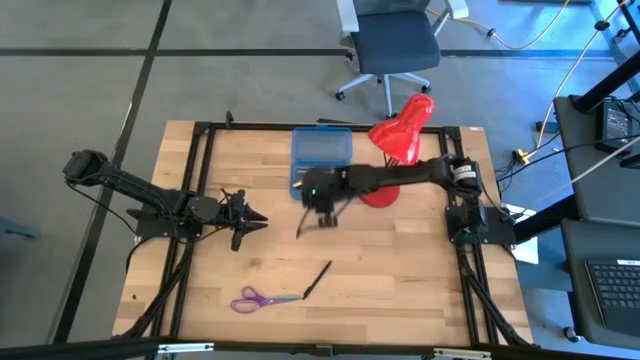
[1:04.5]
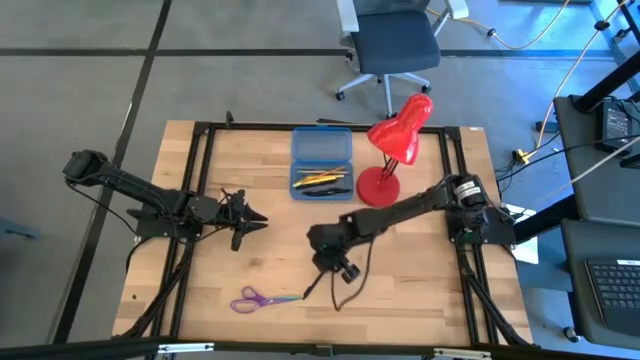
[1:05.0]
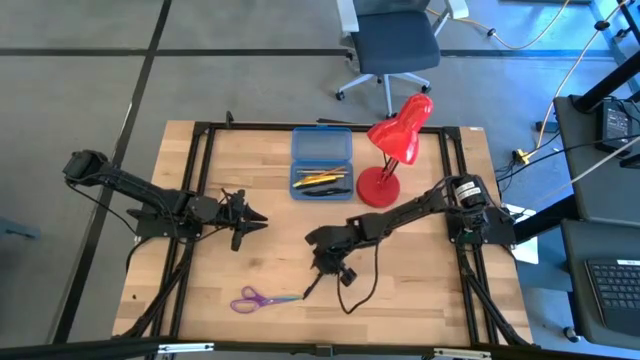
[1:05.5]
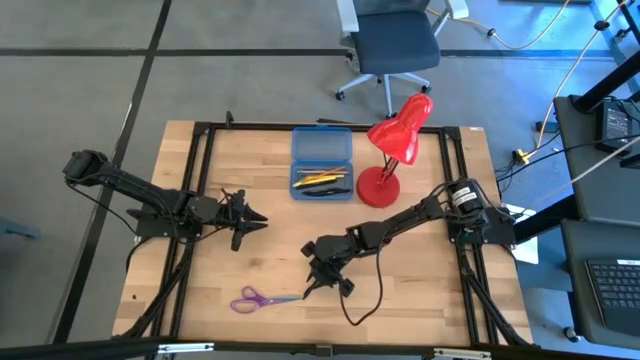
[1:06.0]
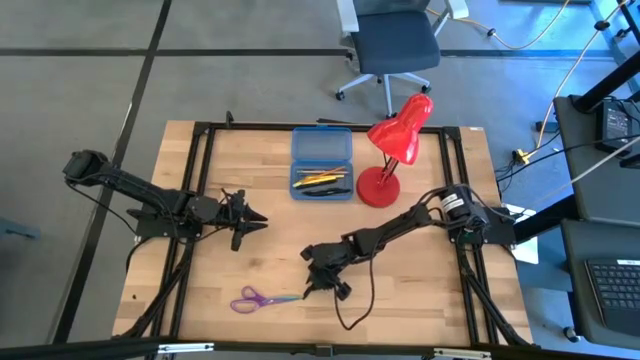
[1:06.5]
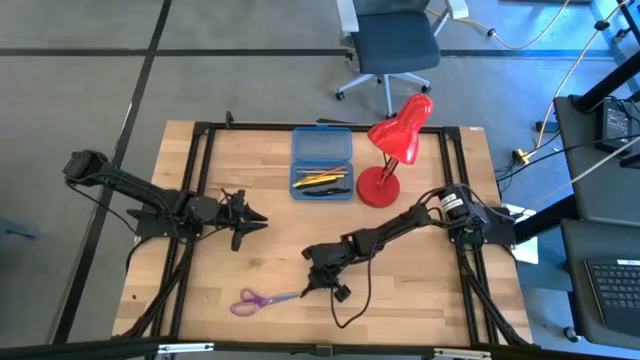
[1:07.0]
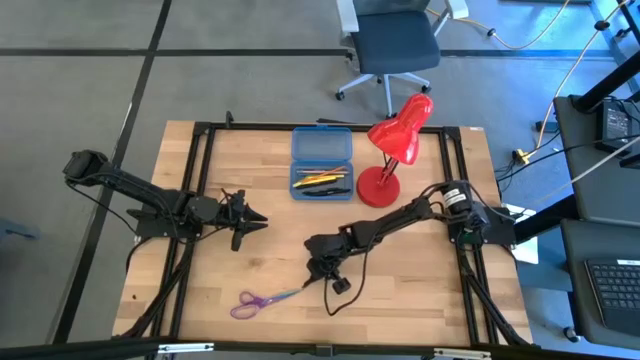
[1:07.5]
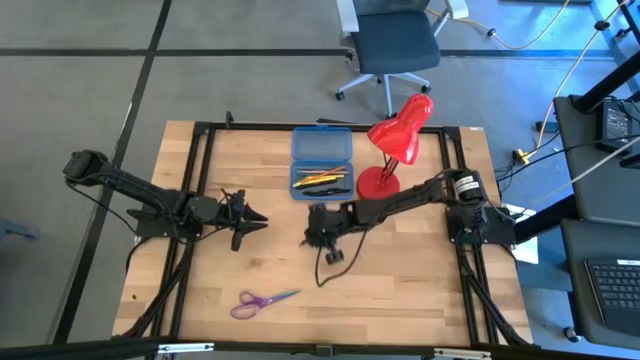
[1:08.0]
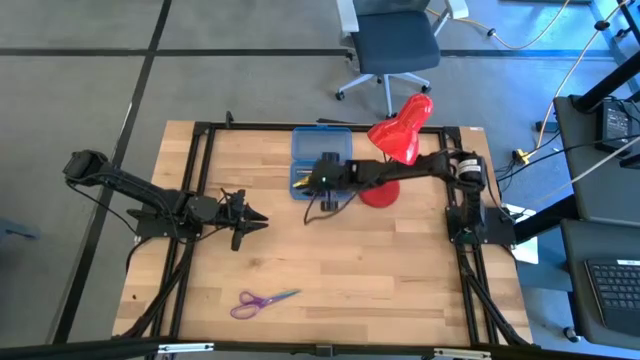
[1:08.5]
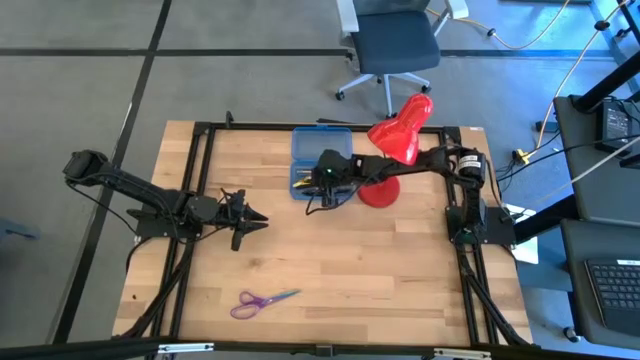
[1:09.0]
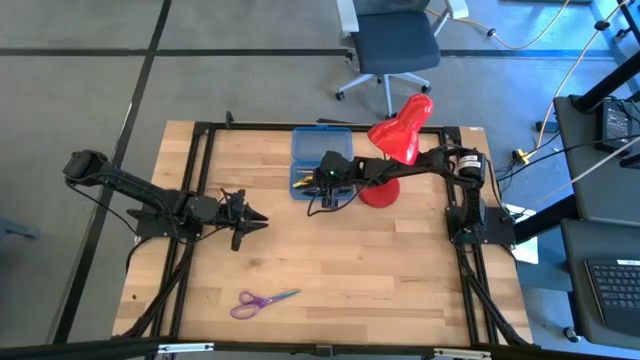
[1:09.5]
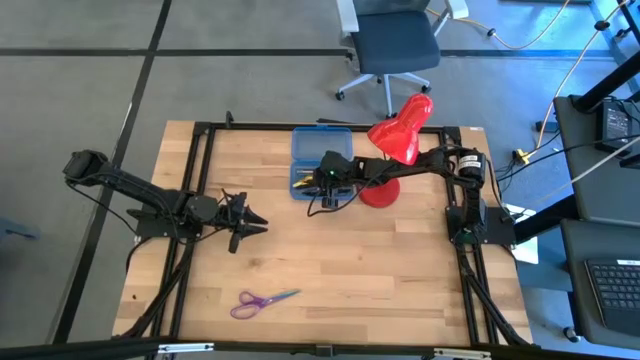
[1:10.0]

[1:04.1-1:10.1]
Task: Pick & place school supplies into a supply box
Put the black pen into the blue supply box

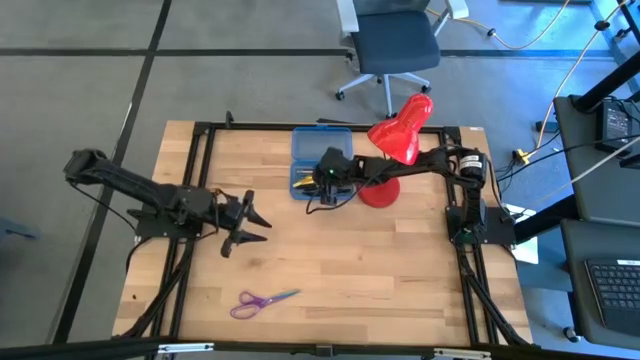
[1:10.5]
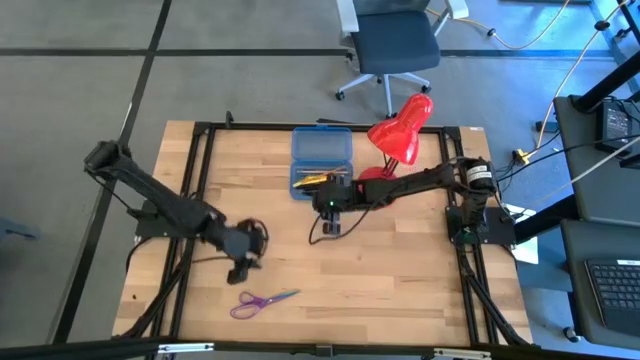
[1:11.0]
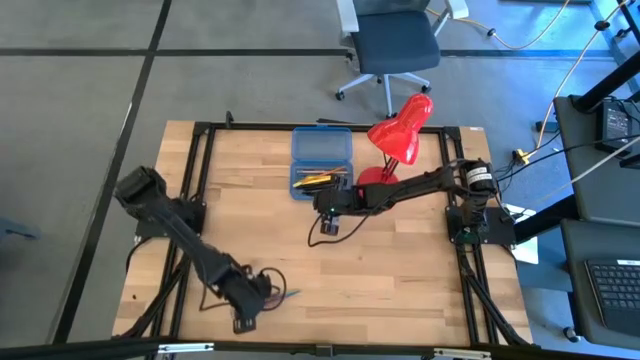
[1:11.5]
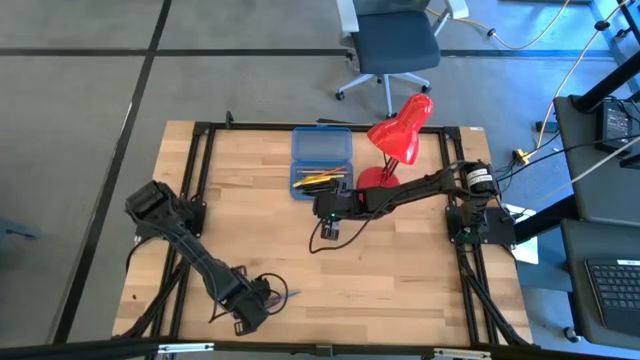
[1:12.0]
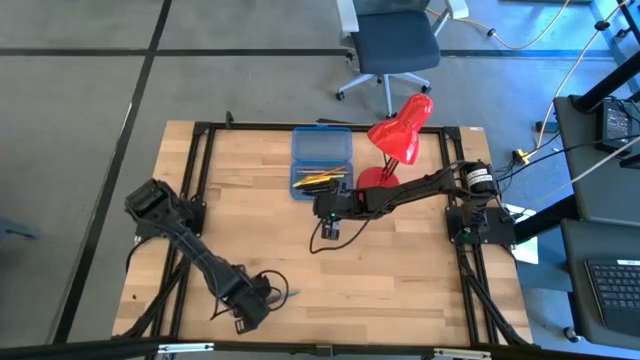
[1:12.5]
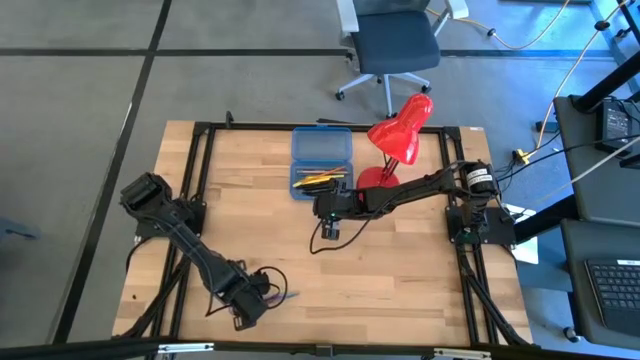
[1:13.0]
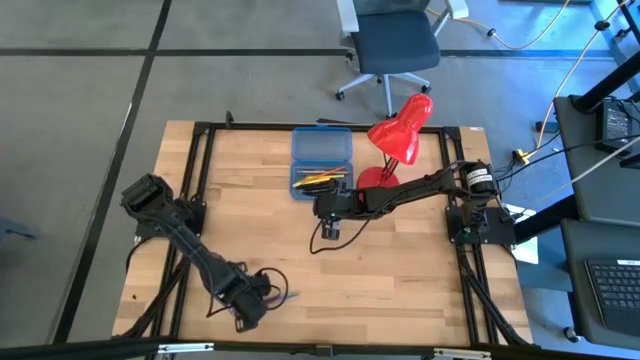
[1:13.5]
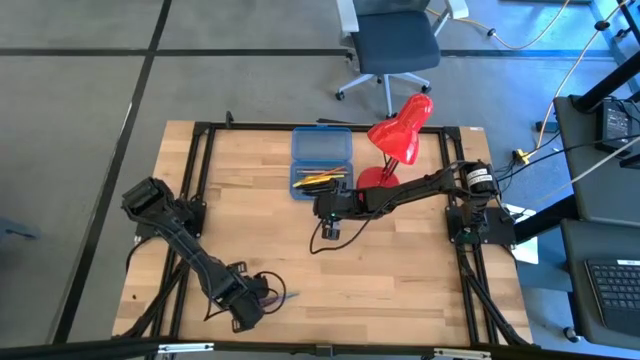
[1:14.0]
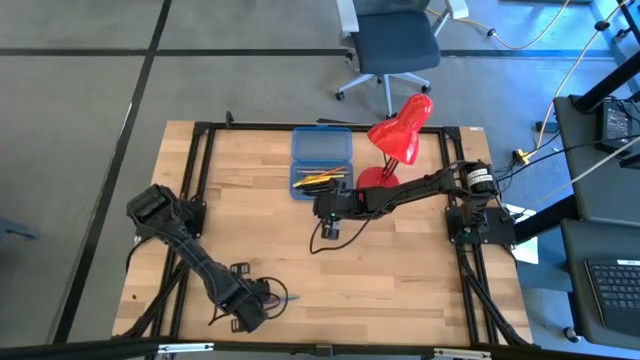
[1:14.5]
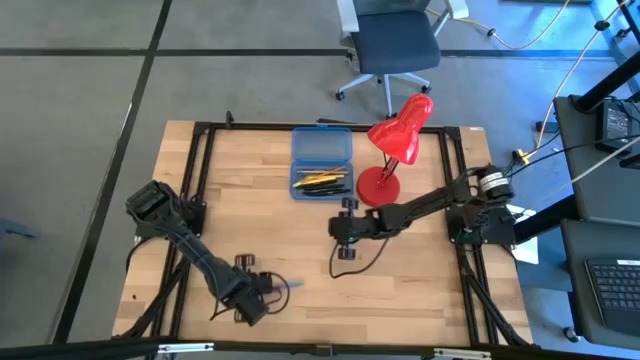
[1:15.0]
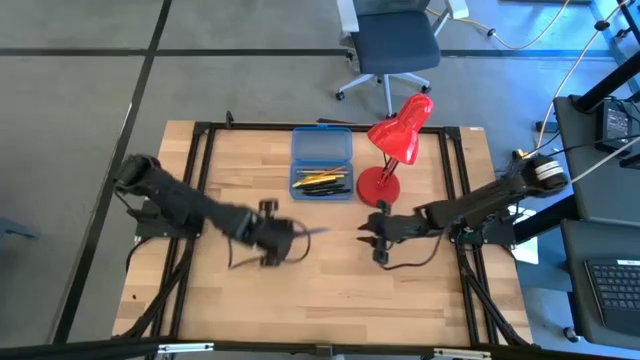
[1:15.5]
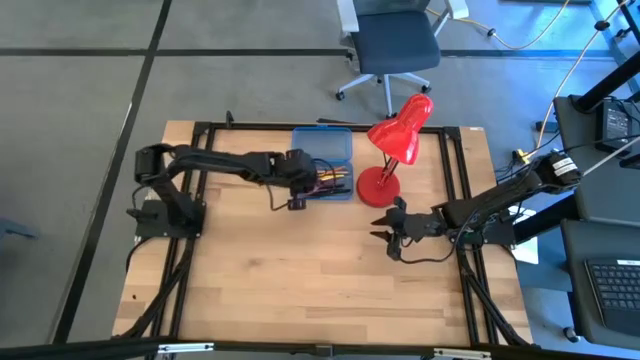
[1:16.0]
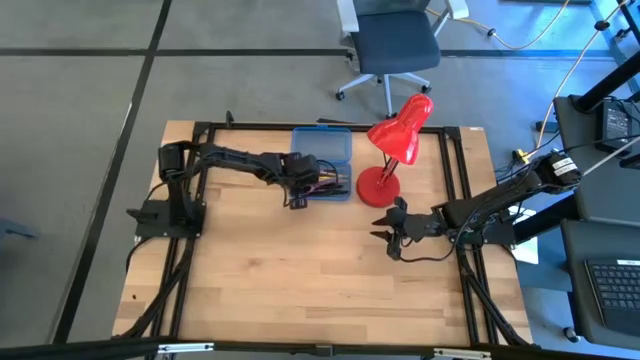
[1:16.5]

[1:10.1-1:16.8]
Put the violet scissors into the blue supply box

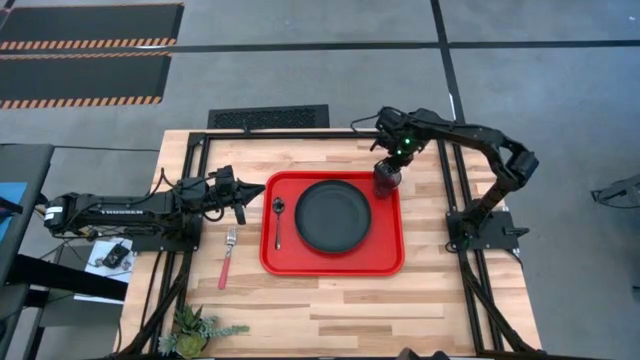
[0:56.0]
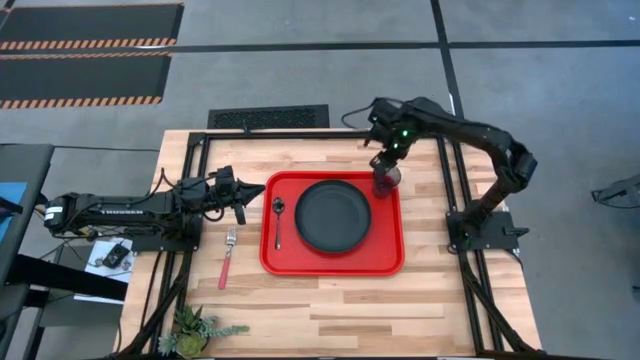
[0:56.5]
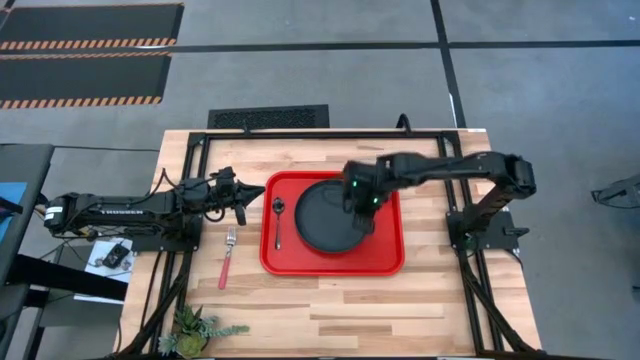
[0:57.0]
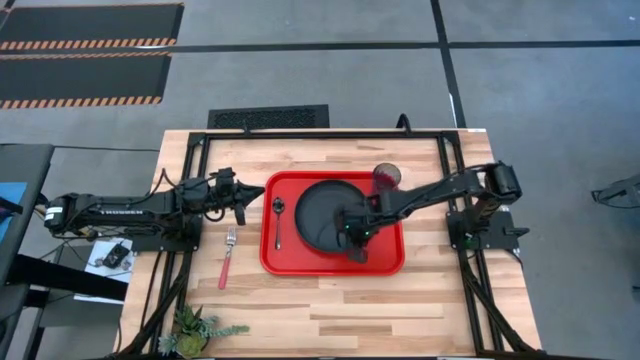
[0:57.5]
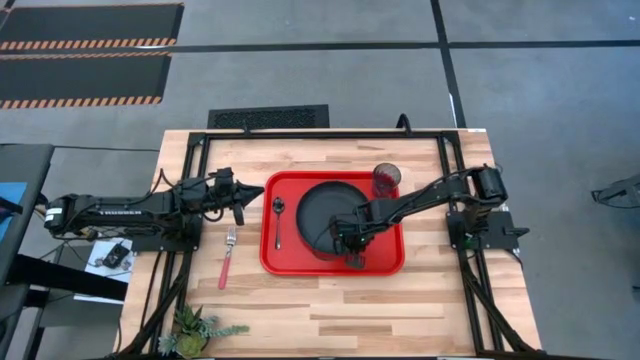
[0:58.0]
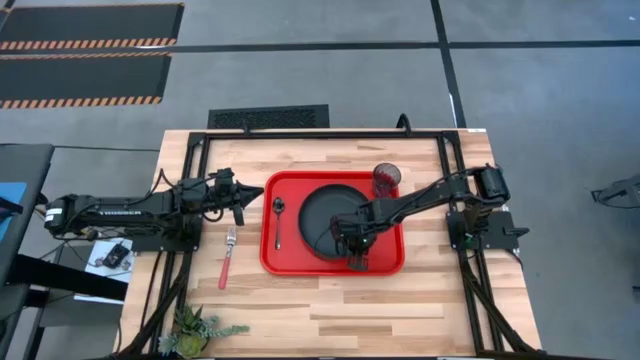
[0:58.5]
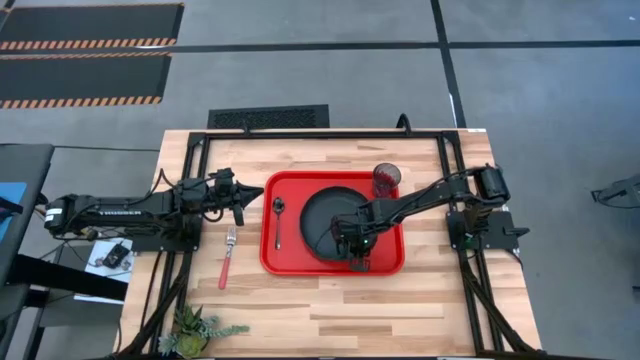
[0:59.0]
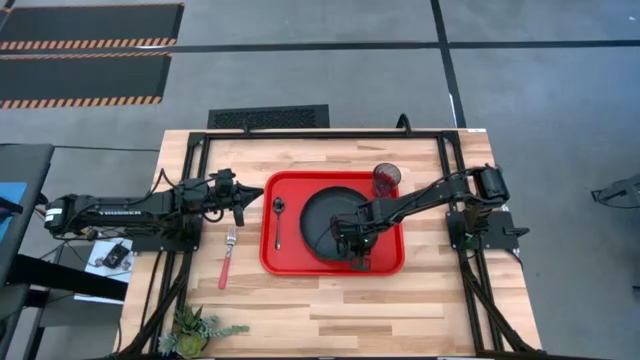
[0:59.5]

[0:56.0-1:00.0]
Task: Pick and place plate/cup/fork/spoon on tray
Move the black plate to the center of the orange tray

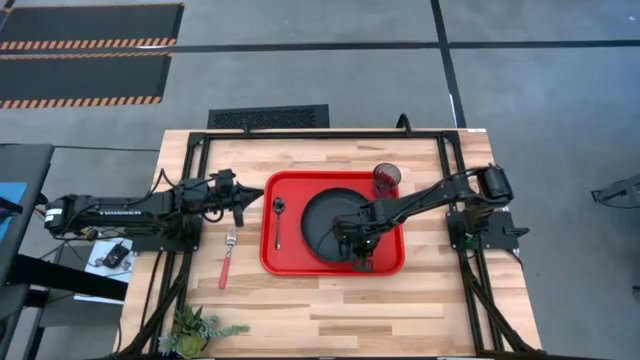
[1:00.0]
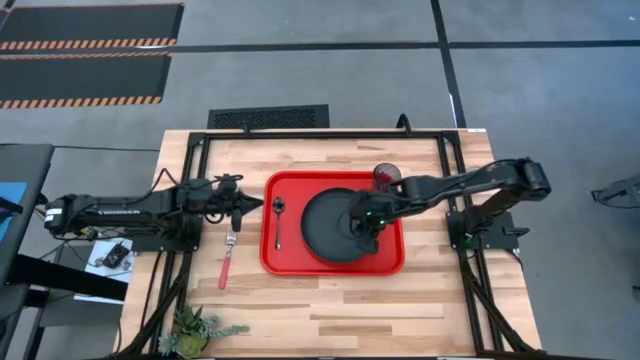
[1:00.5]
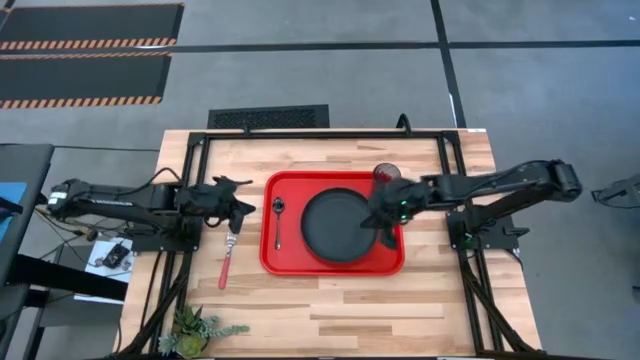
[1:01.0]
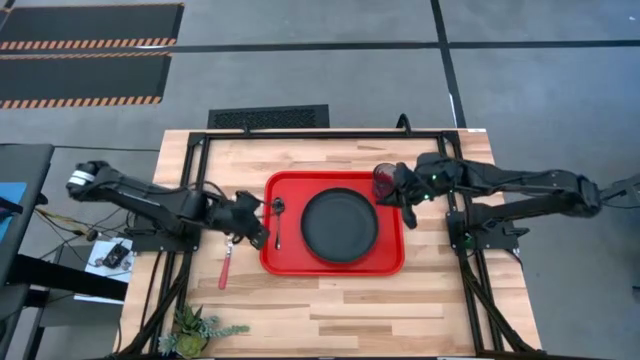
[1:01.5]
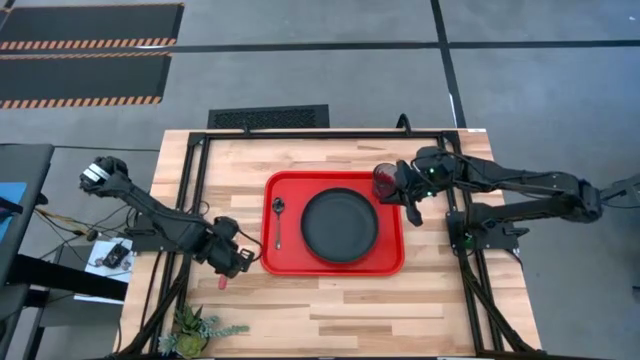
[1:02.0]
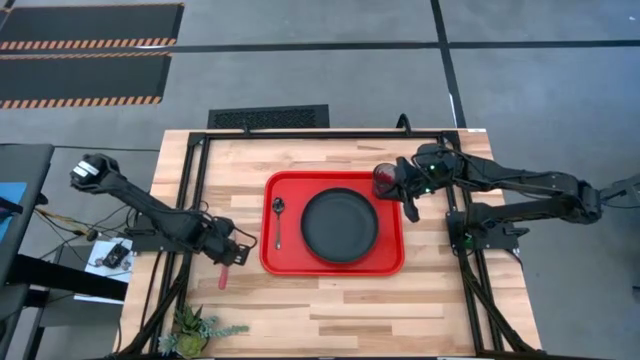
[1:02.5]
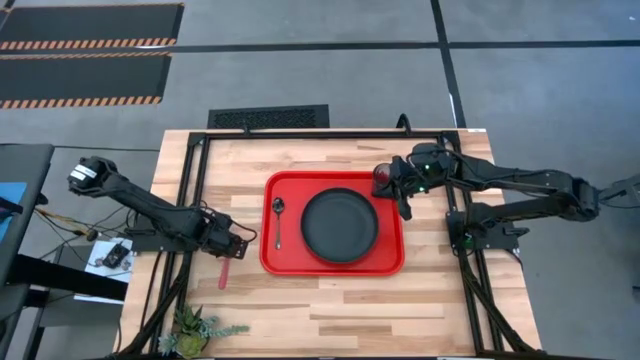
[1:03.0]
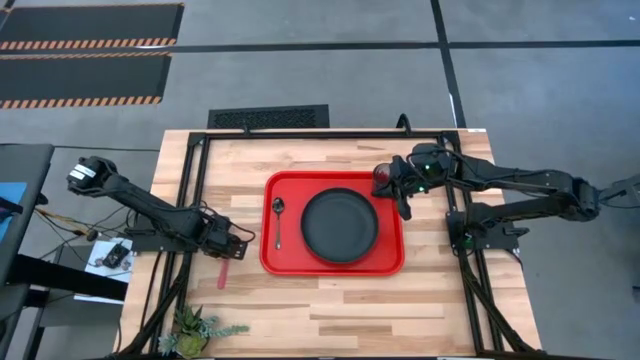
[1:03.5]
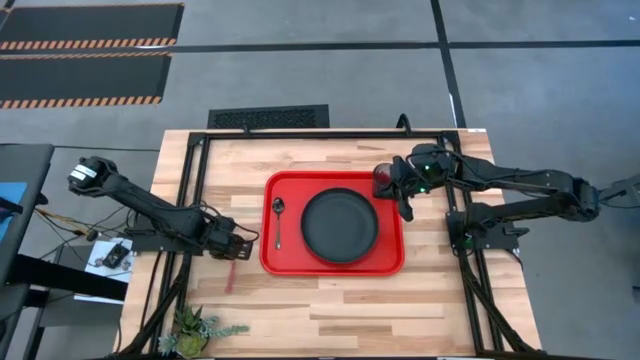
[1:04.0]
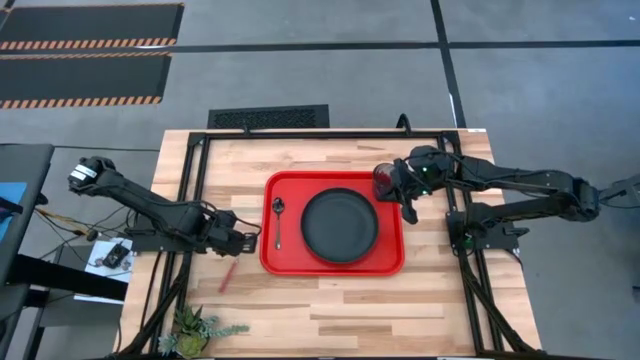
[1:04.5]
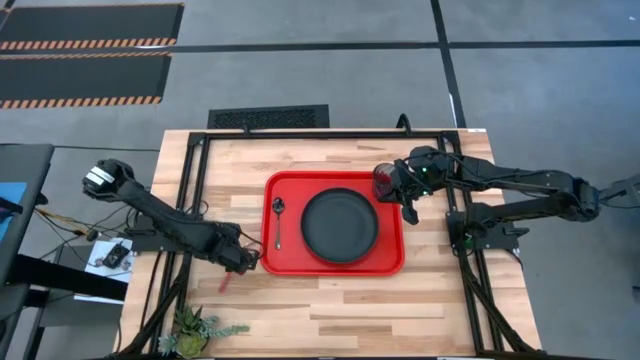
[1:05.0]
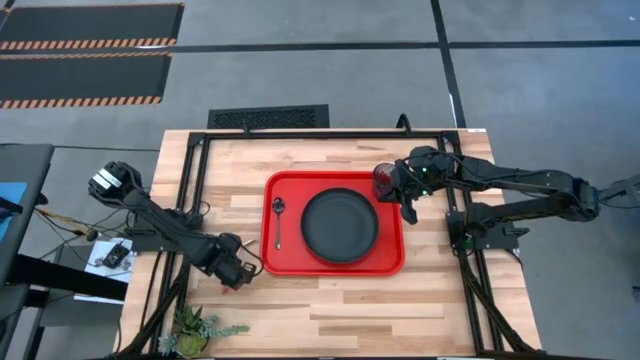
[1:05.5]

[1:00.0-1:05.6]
Put the pink fork on the orange tray
